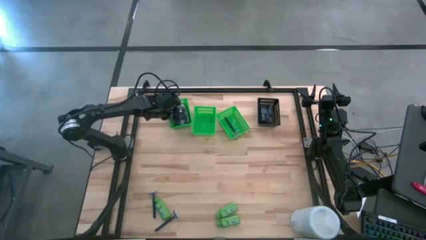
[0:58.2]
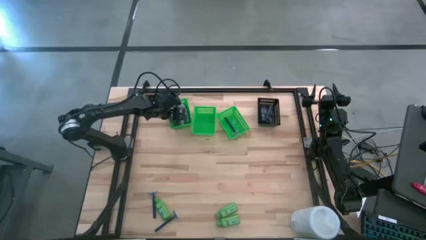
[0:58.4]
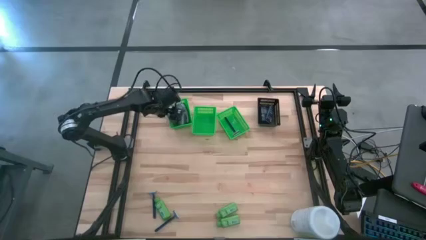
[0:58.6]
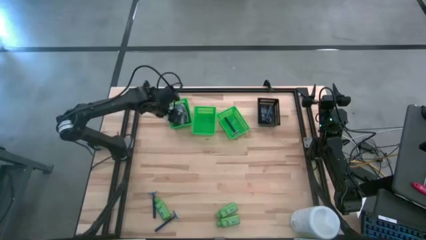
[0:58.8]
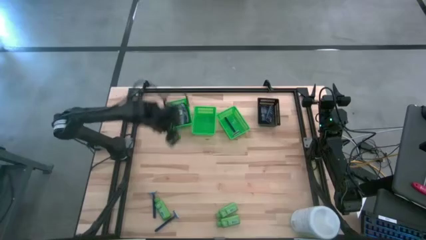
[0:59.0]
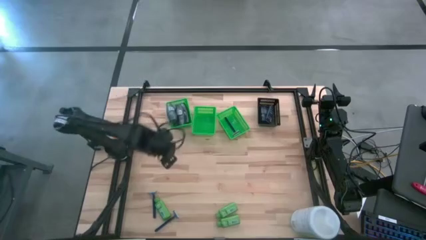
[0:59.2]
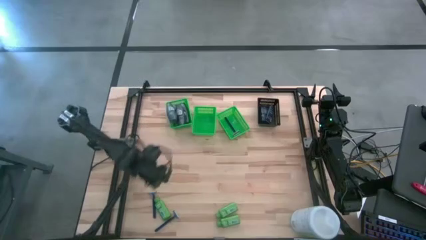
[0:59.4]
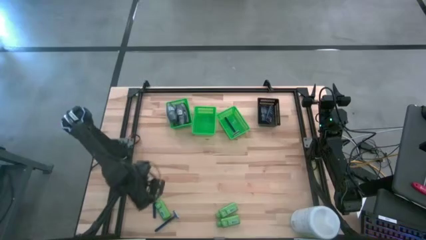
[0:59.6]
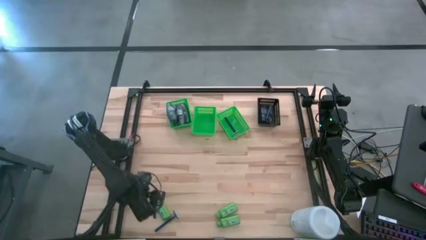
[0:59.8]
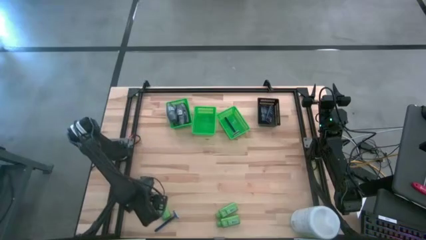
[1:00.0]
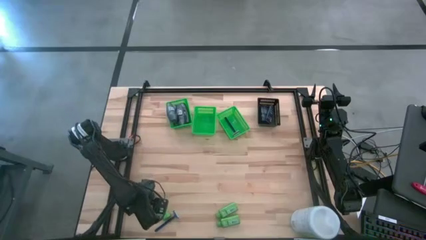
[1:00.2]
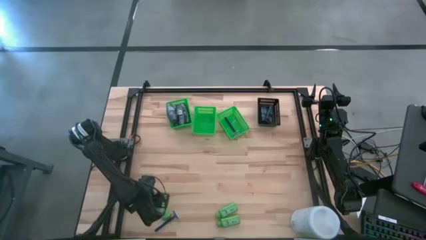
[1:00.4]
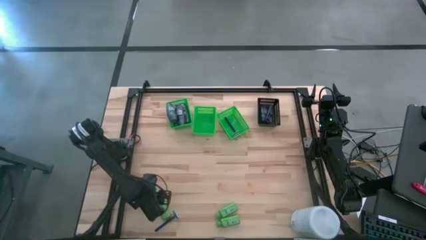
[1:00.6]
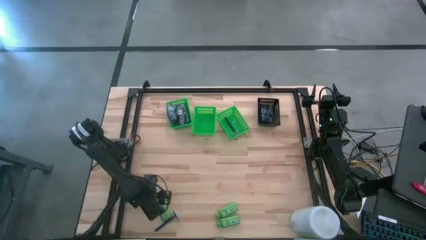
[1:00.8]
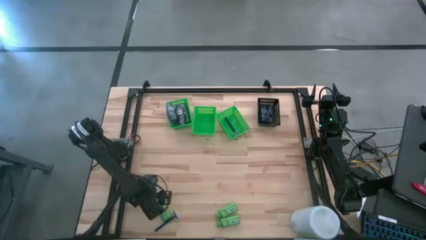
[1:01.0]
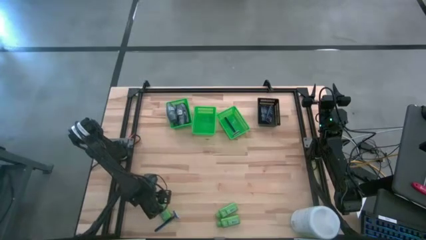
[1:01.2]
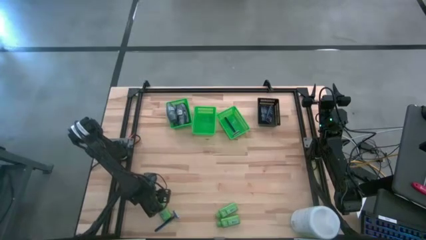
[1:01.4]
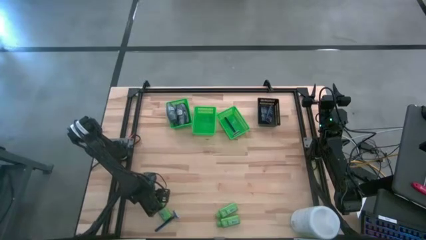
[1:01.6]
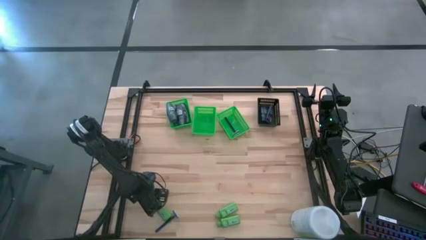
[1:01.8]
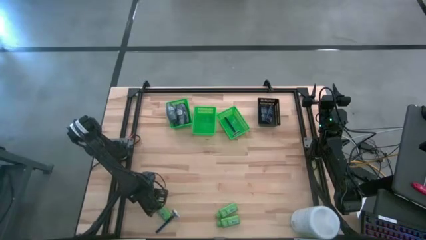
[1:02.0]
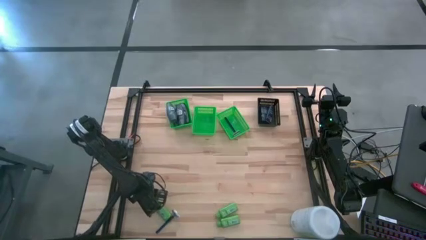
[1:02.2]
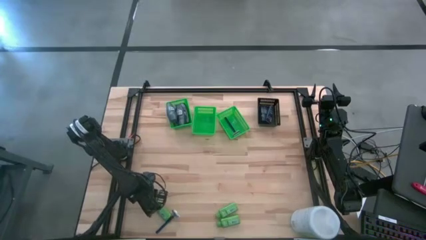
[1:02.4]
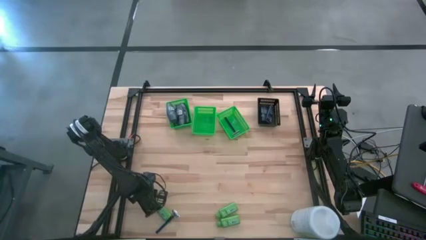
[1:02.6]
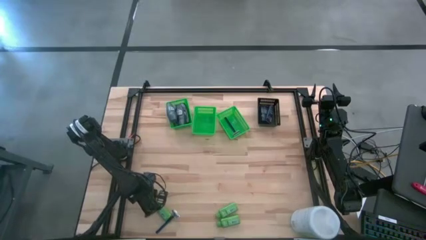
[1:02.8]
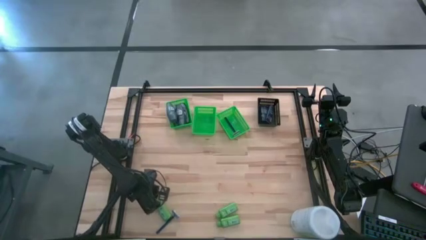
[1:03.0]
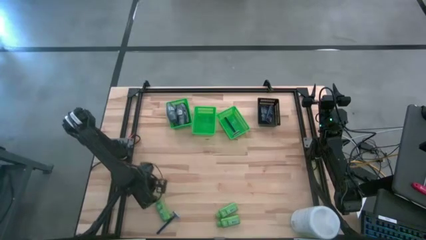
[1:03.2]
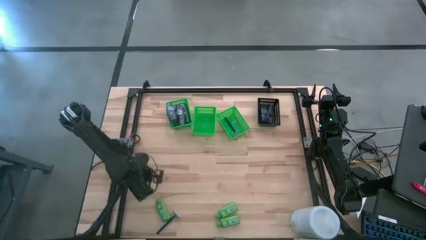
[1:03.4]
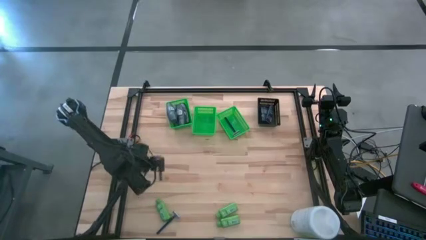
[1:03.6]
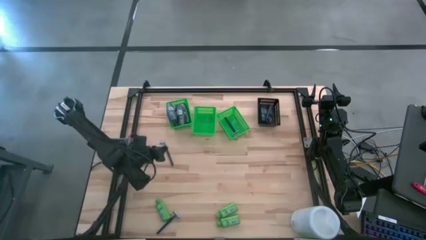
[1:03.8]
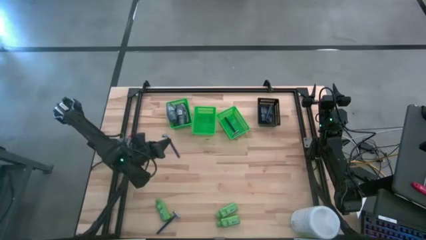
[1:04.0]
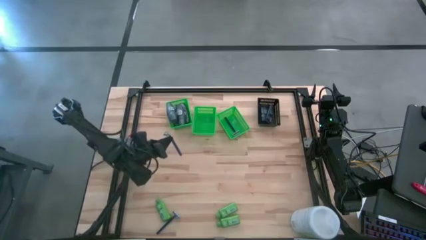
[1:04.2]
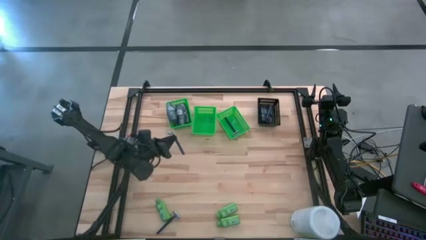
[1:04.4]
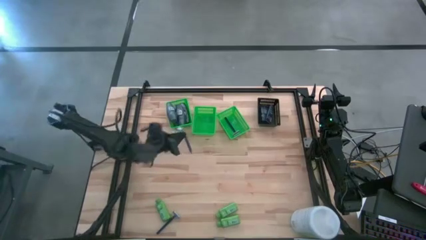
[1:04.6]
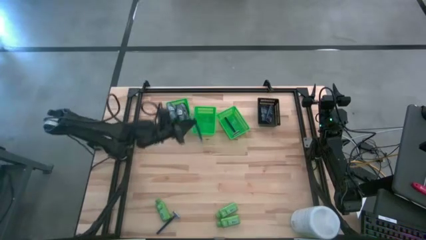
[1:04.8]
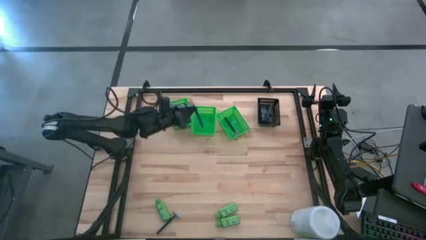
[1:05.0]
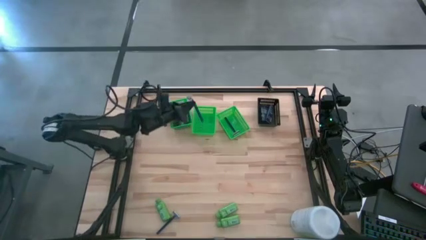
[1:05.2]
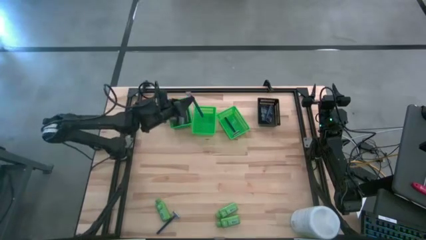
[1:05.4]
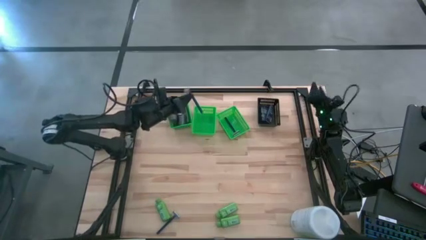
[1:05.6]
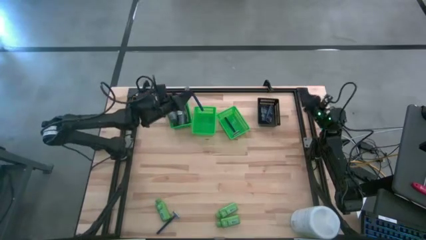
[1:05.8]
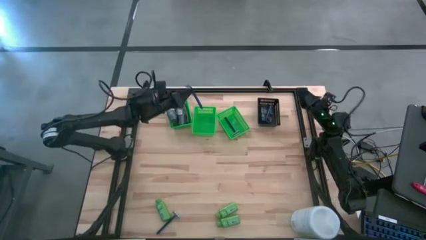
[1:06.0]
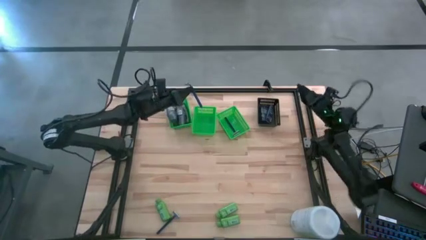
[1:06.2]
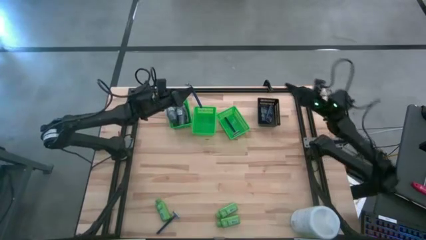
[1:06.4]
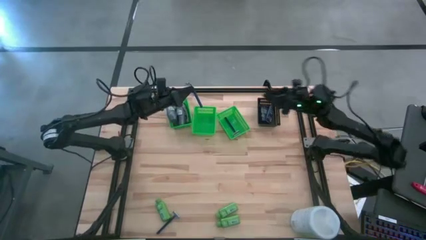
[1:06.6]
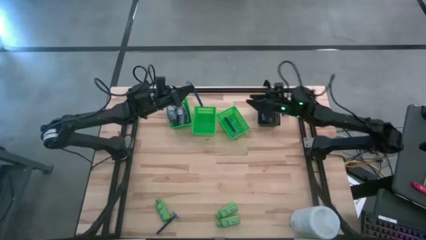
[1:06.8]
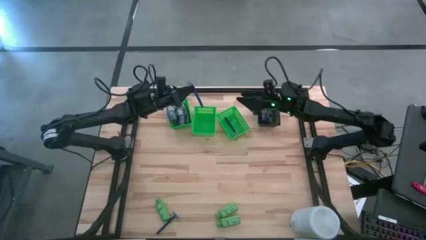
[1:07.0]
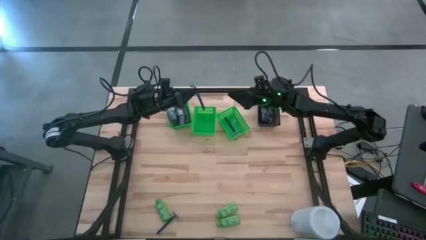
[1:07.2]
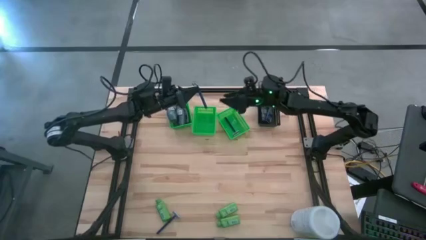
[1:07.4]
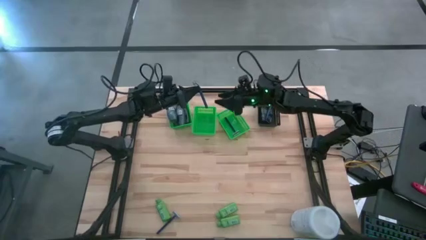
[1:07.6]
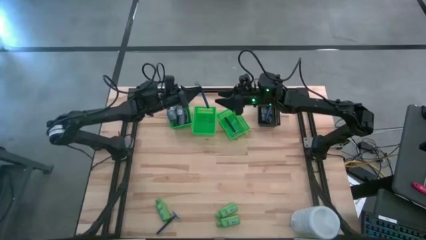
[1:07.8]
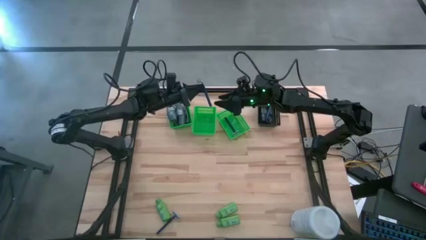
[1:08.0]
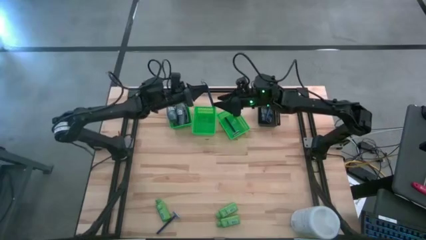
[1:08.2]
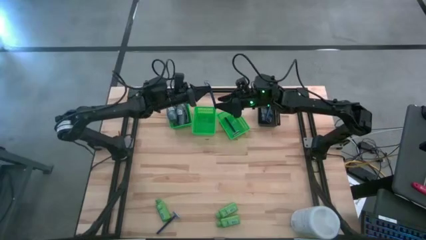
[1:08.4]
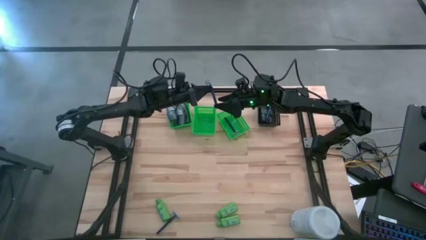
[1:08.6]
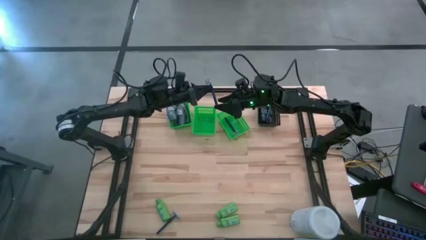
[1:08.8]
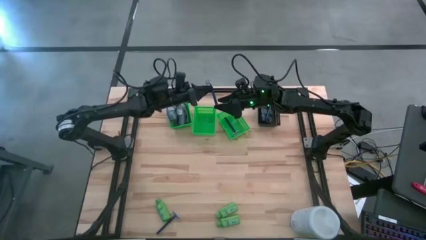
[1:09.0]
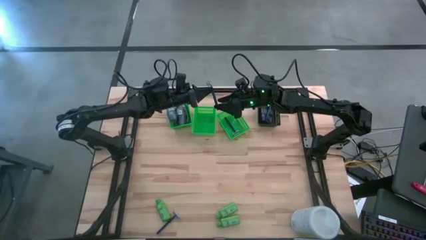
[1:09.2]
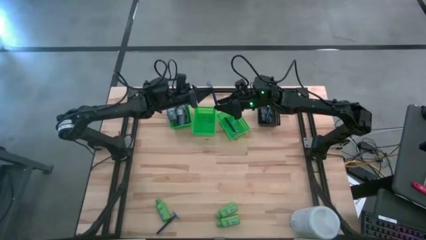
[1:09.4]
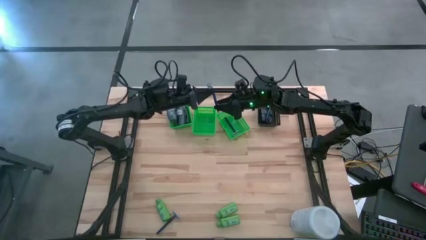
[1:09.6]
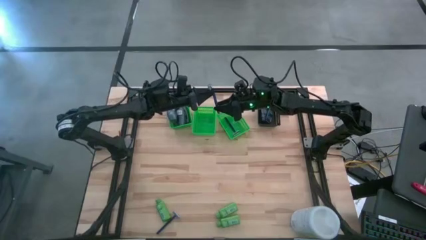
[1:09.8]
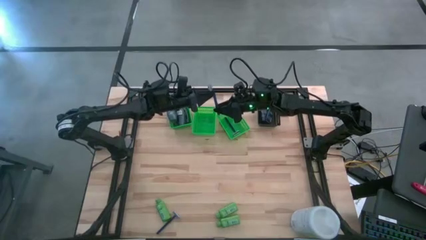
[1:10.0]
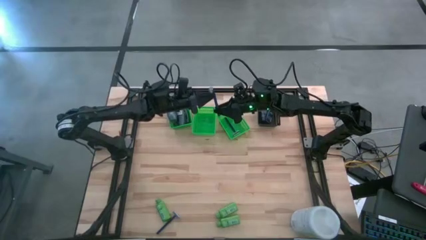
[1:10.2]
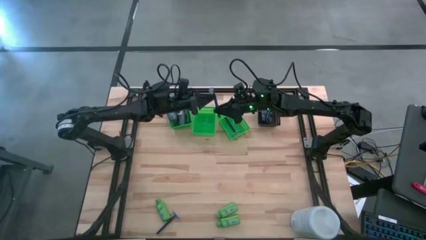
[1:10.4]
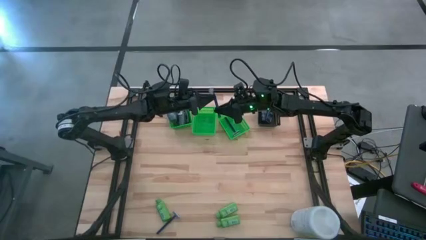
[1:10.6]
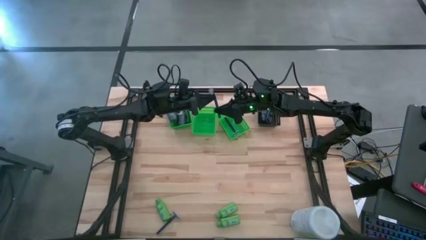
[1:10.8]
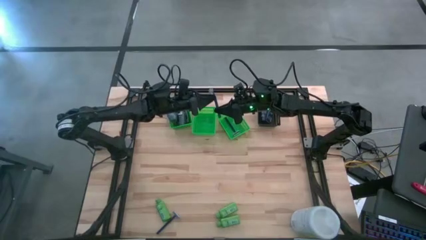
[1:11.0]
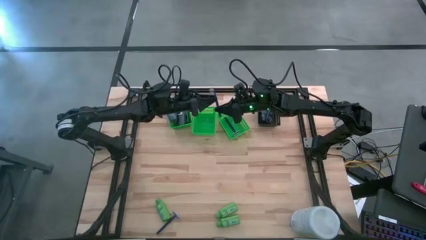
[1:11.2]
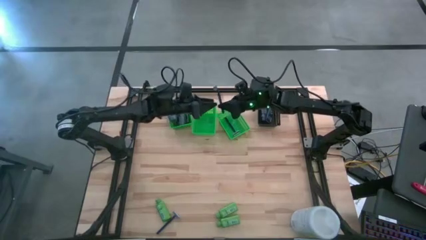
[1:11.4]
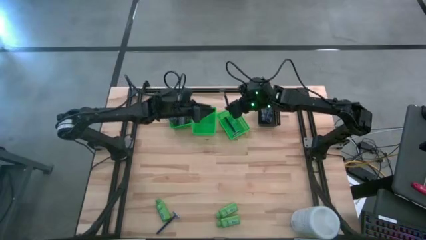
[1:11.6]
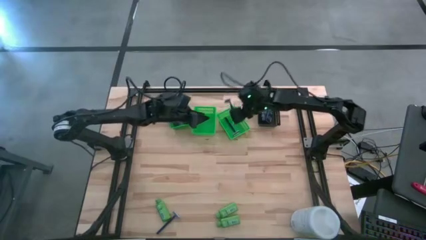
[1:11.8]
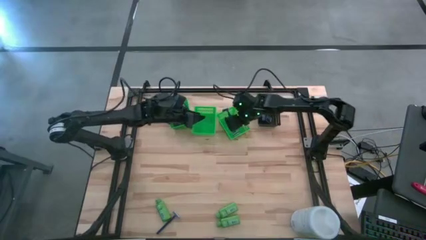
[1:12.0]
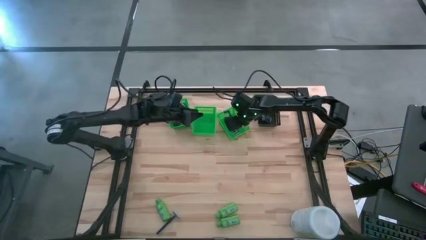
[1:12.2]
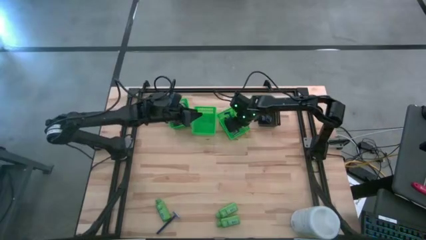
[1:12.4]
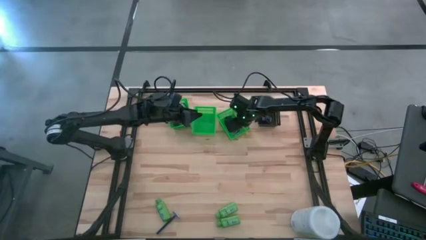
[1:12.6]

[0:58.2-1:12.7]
Task: Pick & Place Travel size toiletries
Put the razor into the right green bin

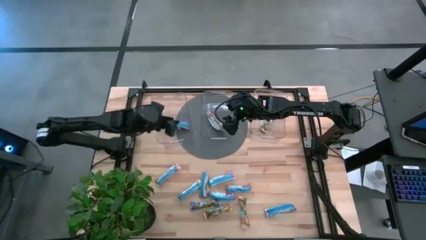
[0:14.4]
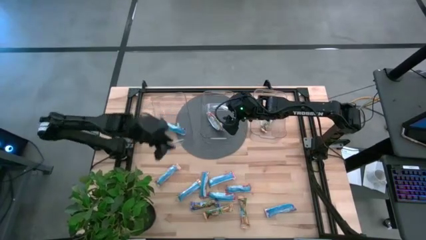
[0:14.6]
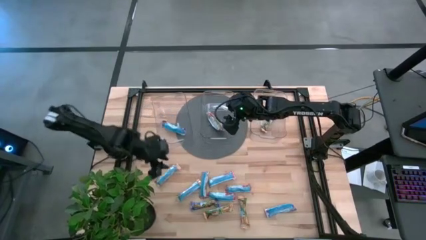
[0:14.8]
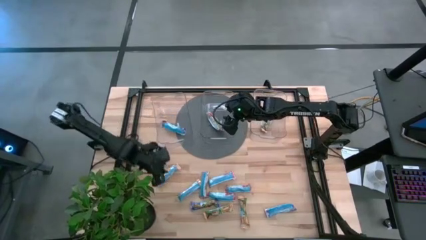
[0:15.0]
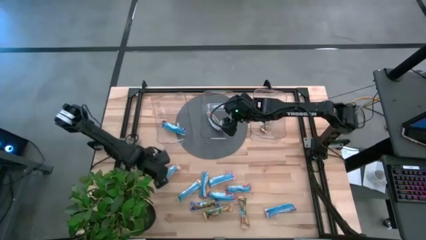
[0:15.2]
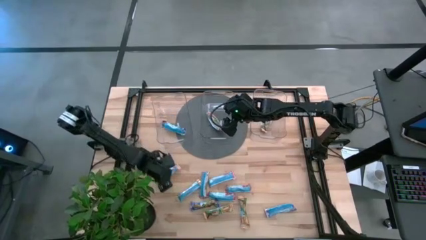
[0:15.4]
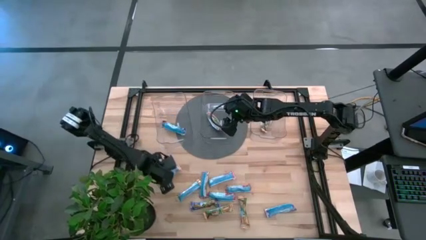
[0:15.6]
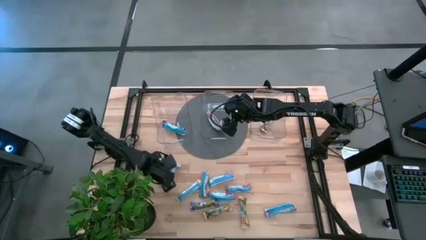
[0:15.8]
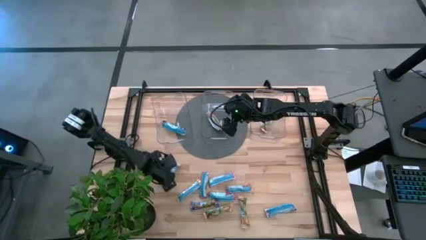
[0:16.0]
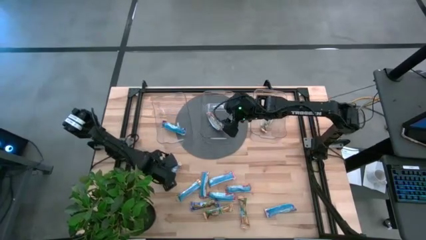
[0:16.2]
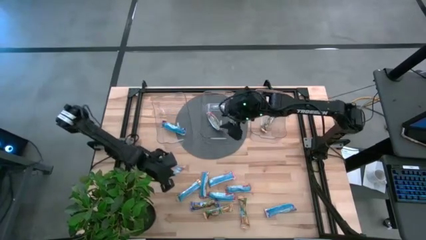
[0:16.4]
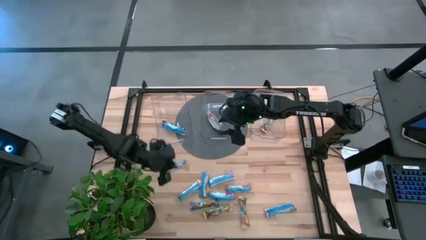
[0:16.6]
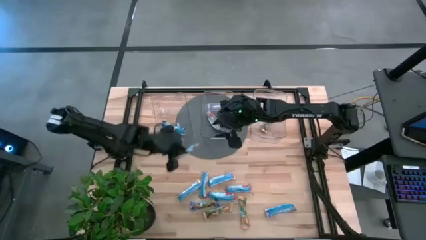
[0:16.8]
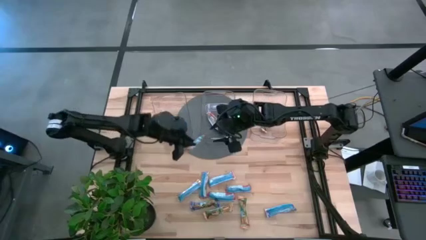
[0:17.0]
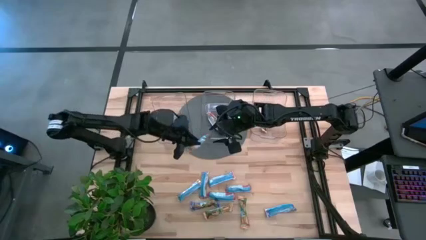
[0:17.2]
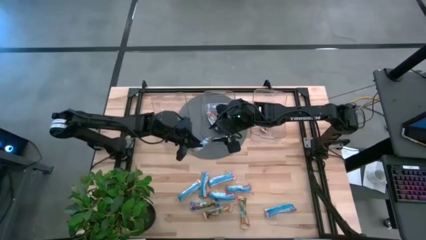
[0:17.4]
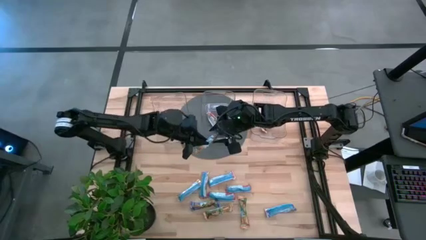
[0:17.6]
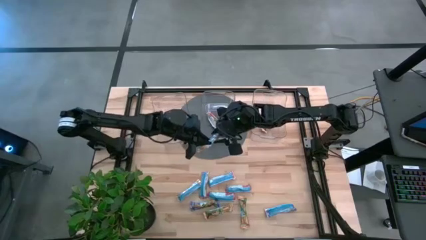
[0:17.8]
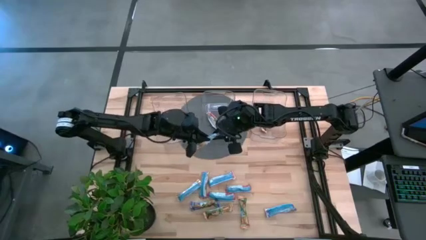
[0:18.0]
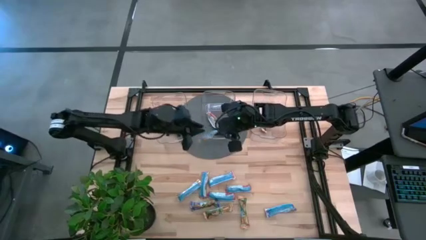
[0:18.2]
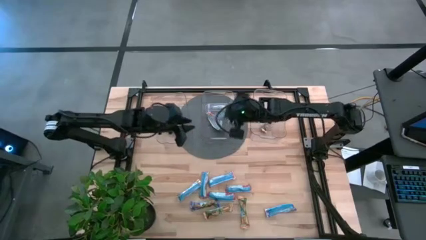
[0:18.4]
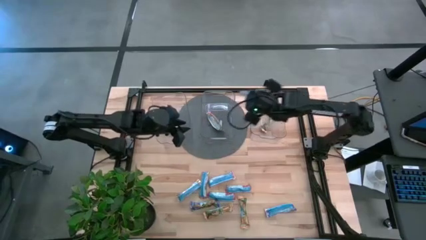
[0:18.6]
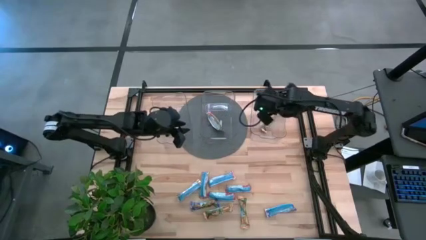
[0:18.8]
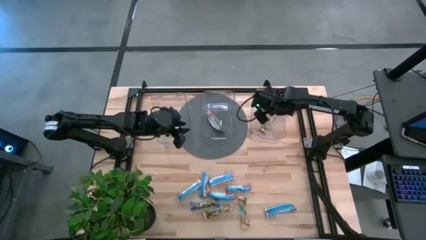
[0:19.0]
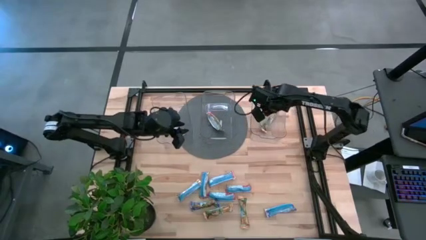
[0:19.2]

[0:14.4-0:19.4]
Task: Pick and place Granola Bars by type
Put the yellow granola bar into the right transparent bin
